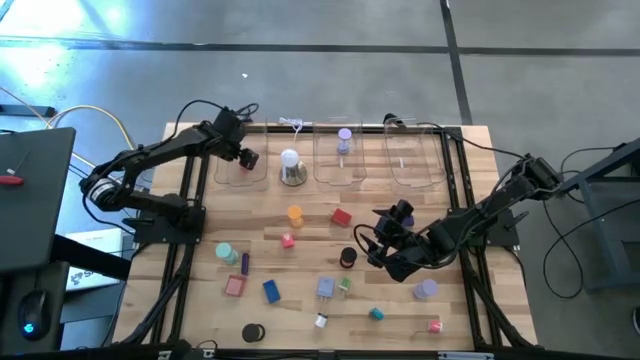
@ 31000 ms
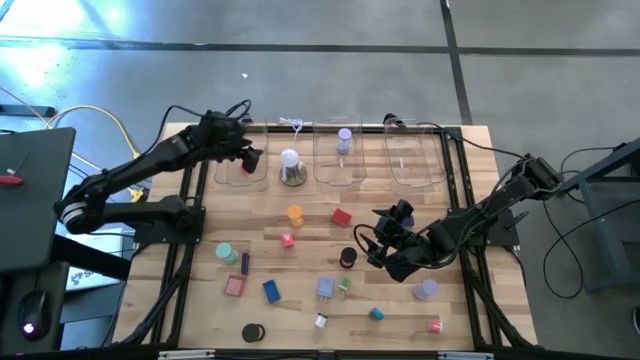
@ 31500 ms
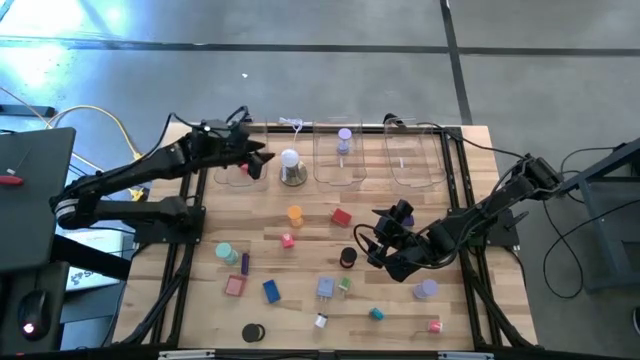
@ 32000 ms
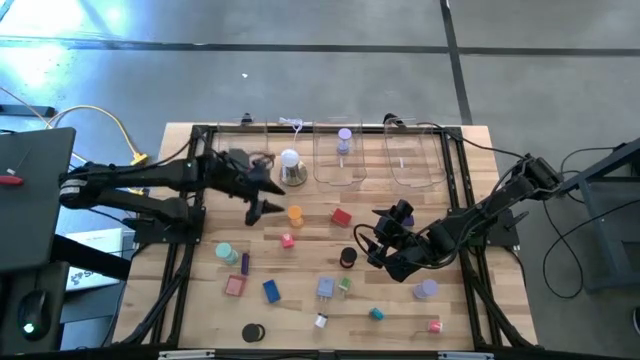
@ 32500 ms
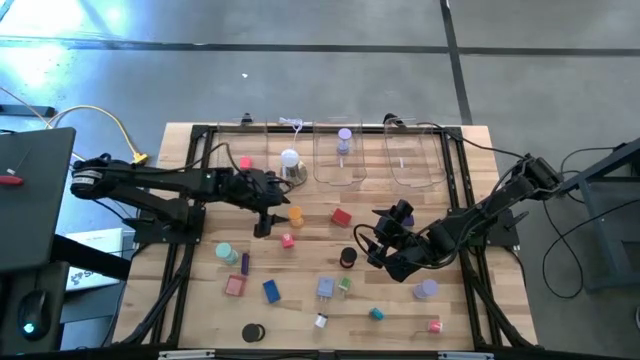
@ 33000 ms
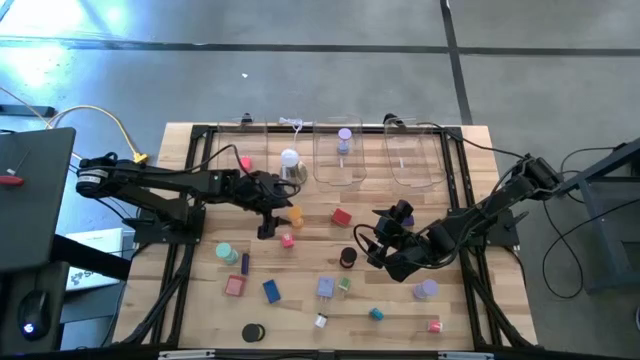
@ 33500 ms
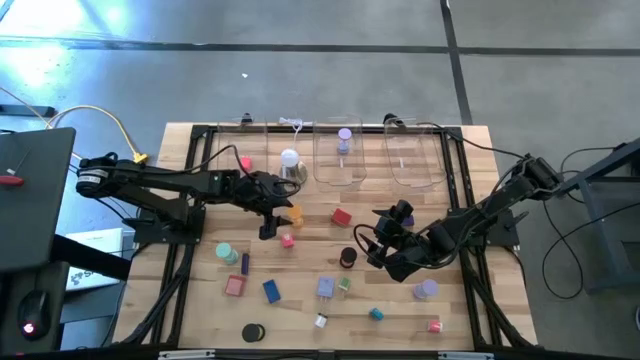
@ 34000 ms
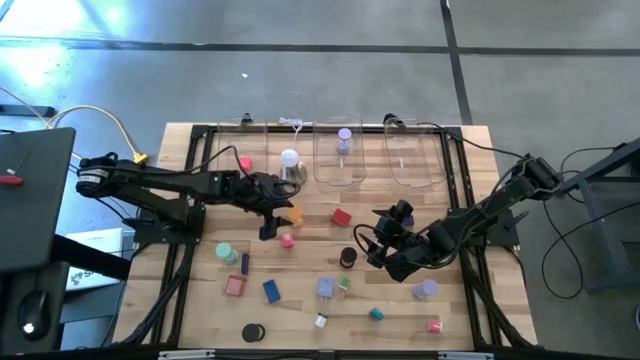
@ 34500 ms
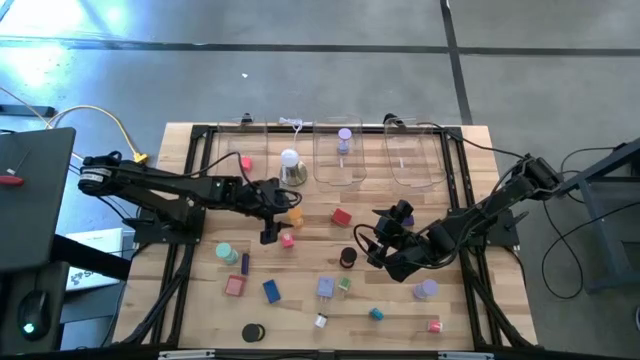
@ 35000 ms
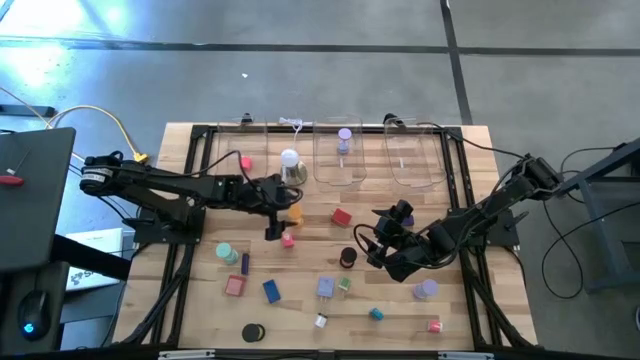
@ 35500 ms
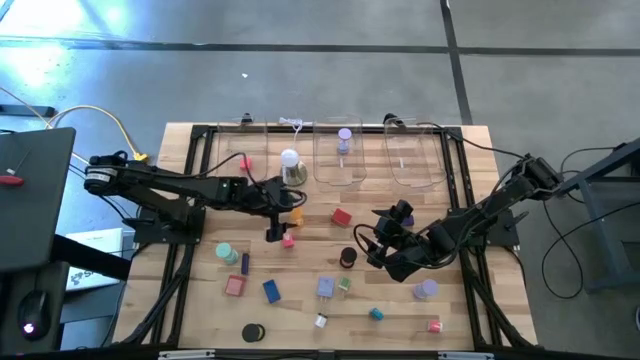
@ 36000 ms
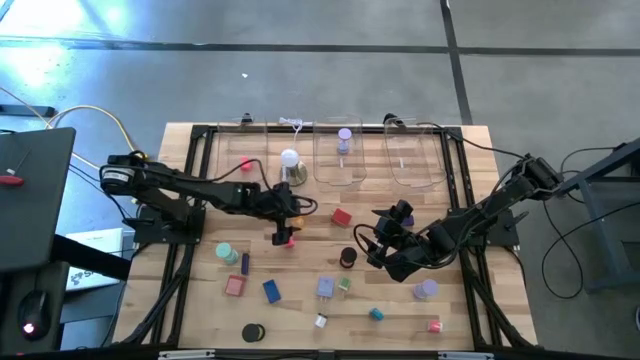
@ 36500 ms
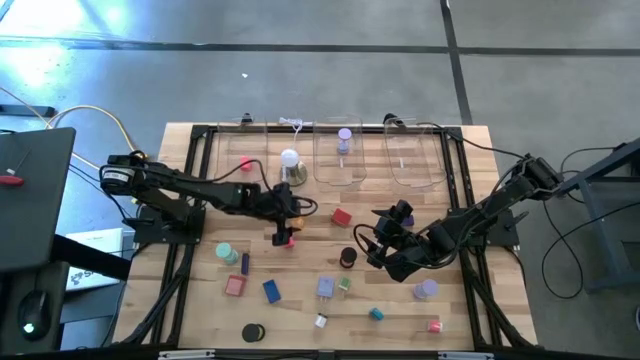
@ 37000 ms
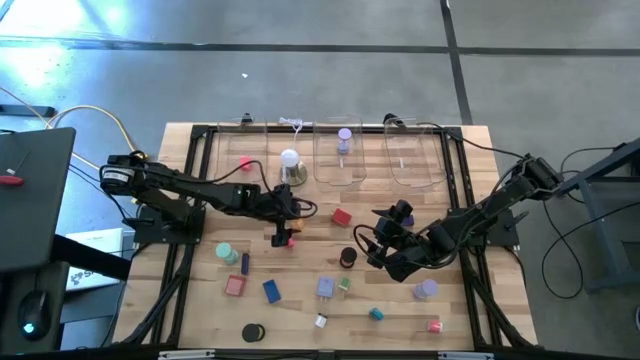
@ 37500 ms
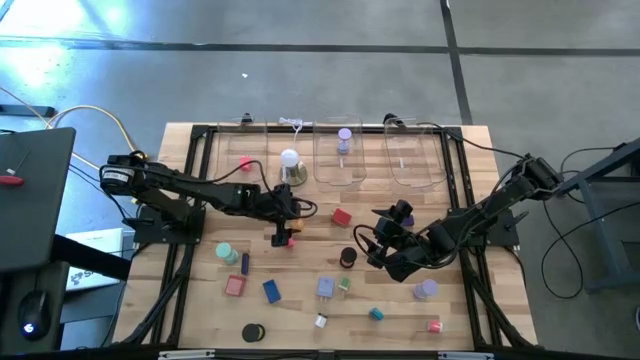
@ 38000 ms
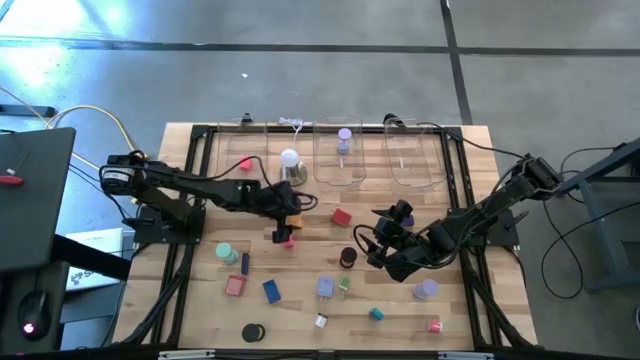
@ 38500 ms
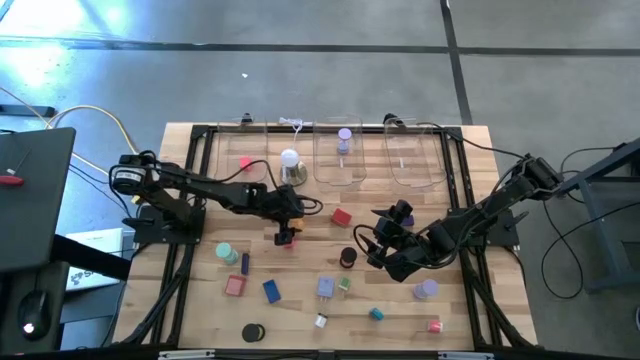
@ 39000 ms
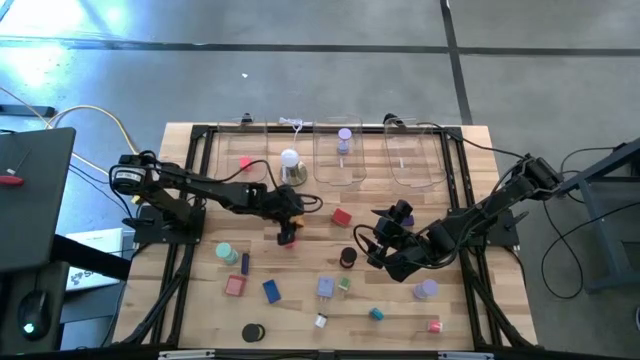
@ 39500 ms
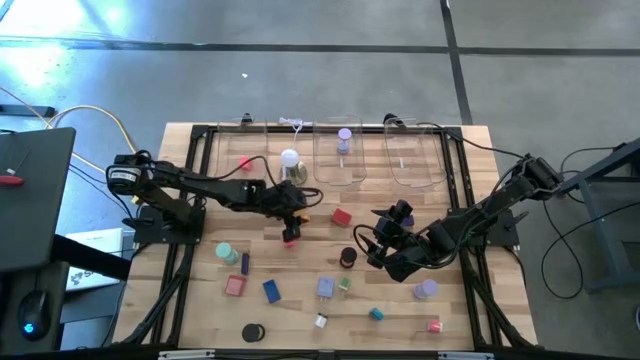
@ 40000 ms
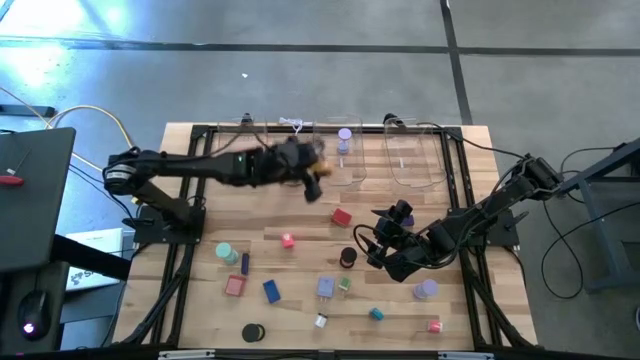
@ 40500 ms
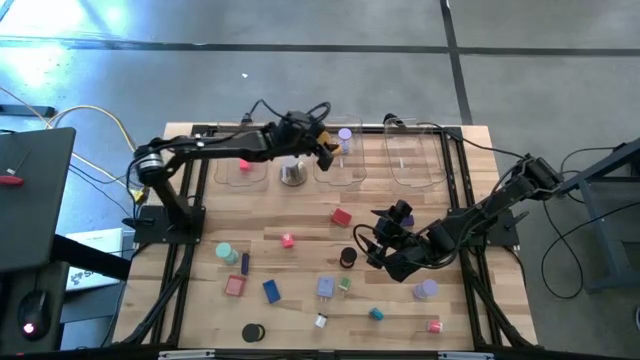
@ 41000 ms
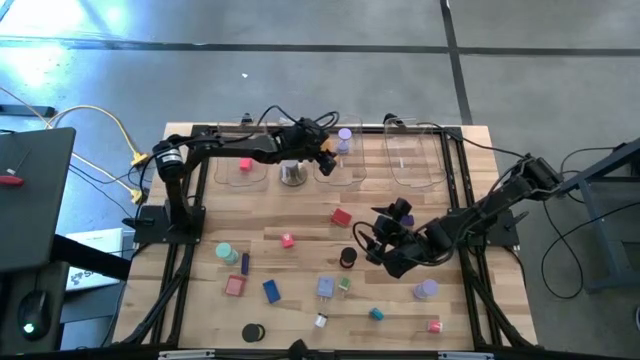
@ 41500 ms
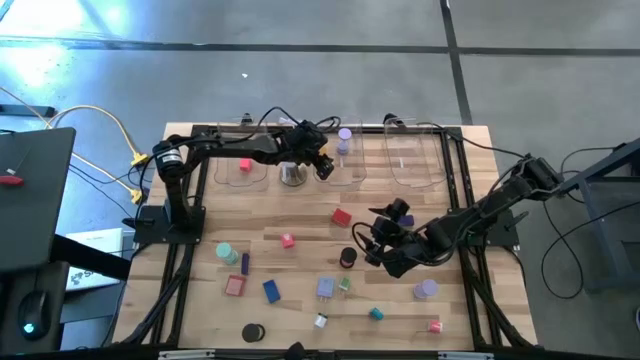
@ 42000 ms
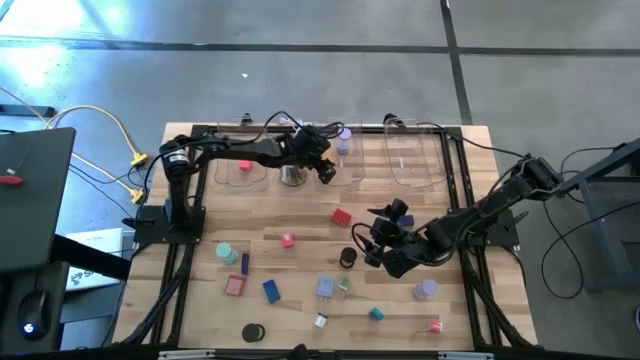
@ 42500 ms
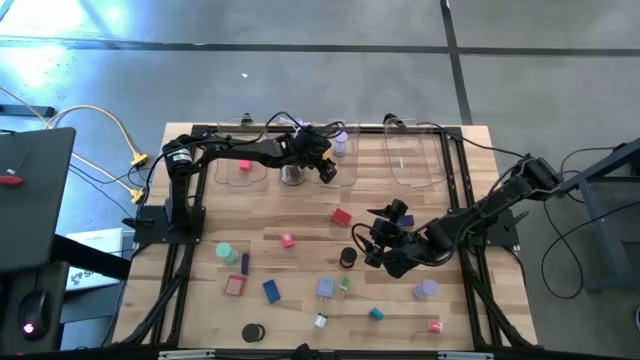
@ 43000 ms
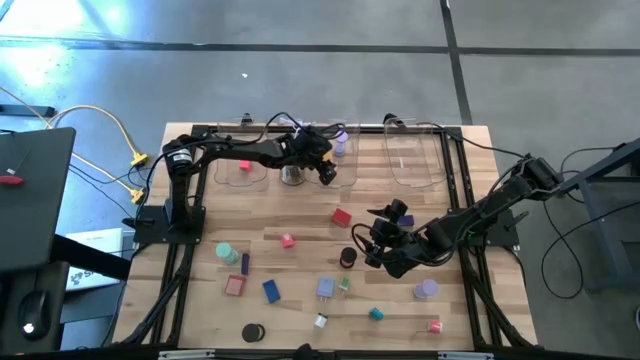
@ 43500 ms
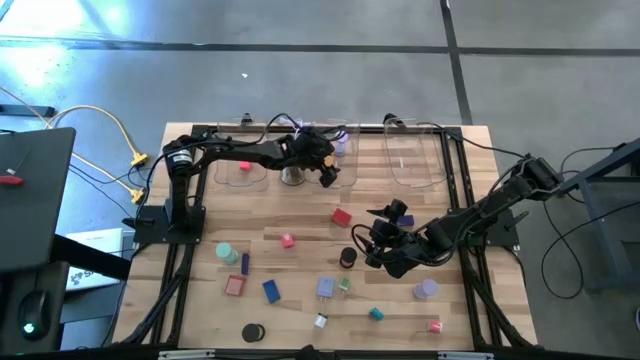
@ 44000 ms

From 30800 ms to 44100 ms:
Task: Pick & Place Office items
Put the yellow hourglass into the middle transparent bin

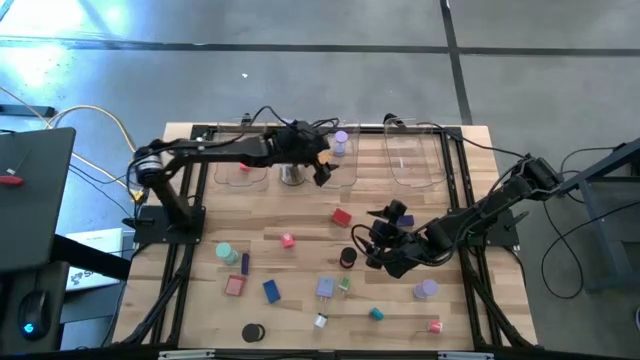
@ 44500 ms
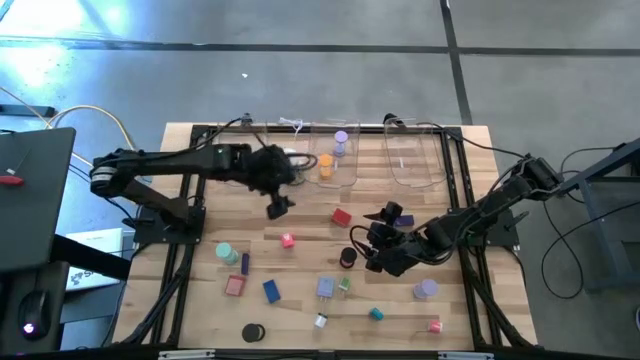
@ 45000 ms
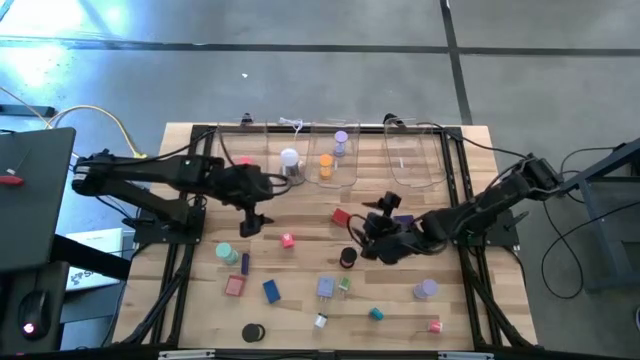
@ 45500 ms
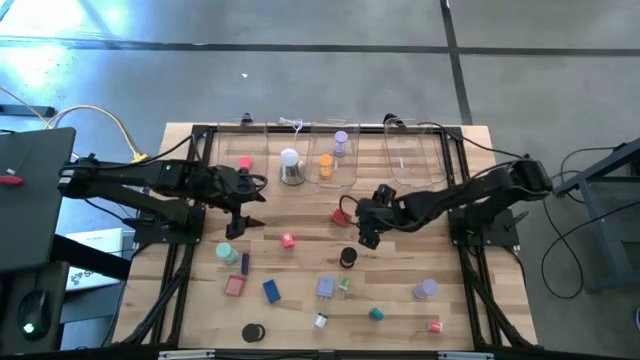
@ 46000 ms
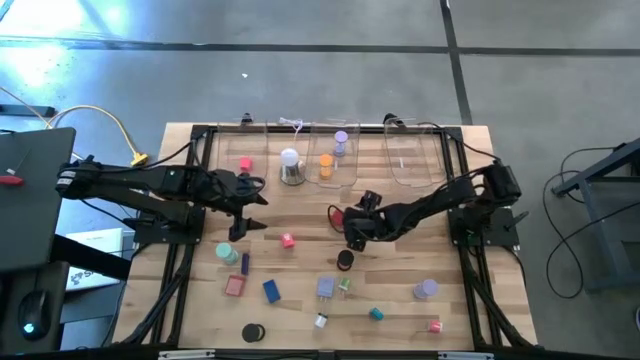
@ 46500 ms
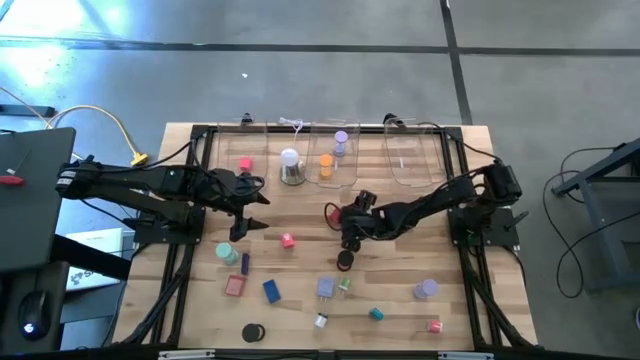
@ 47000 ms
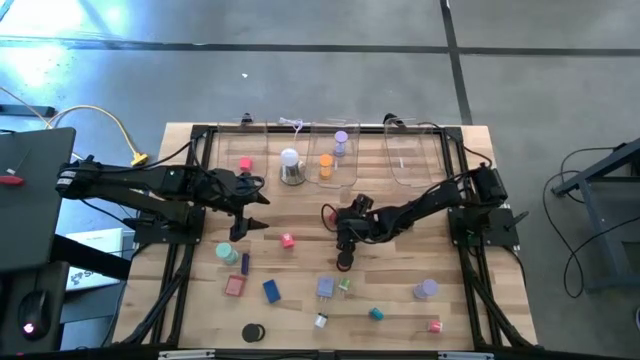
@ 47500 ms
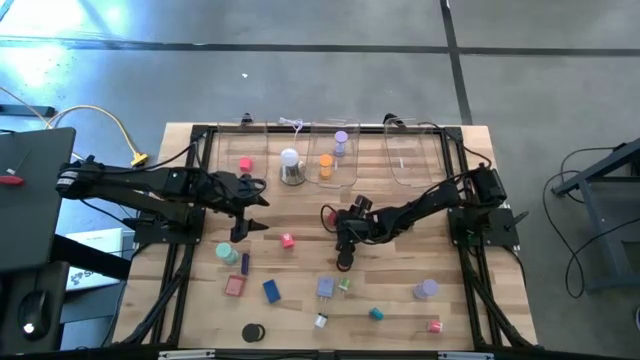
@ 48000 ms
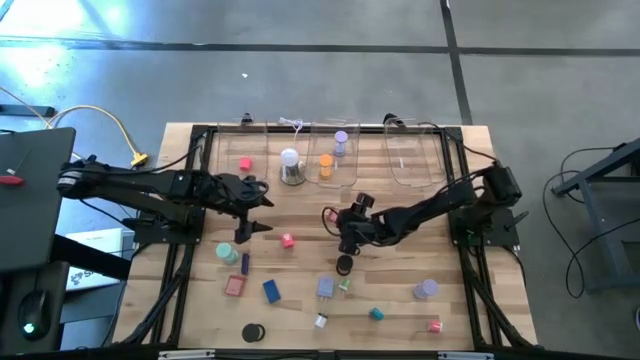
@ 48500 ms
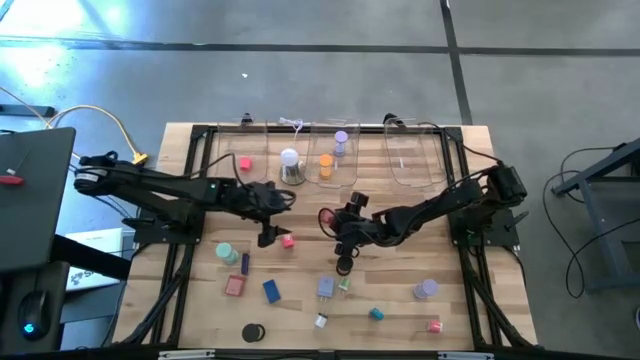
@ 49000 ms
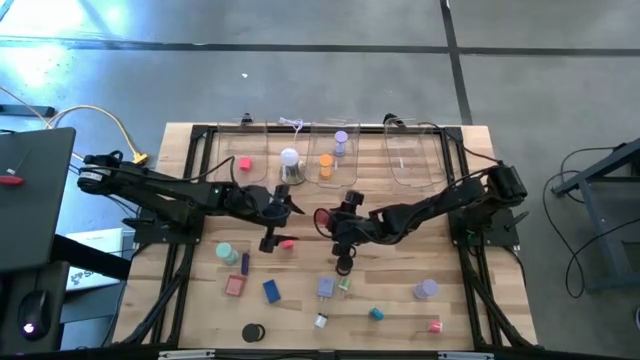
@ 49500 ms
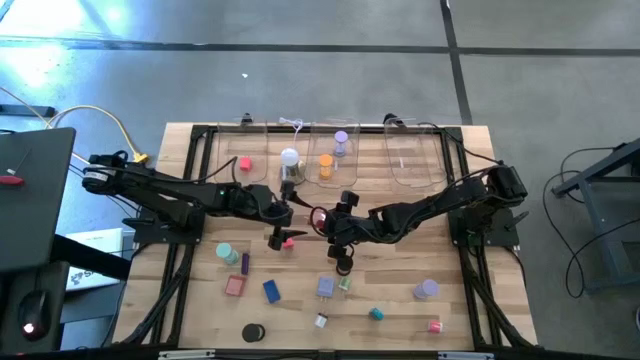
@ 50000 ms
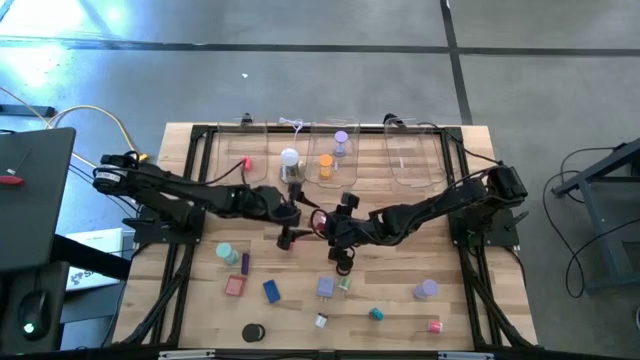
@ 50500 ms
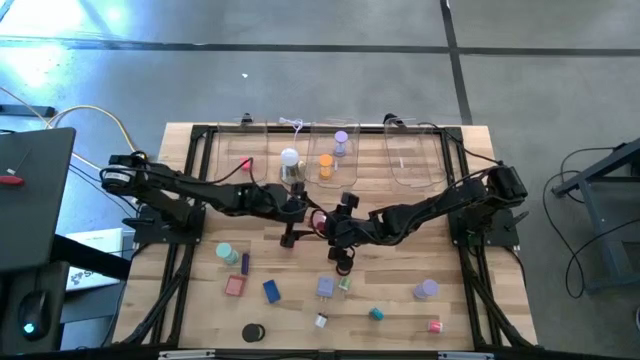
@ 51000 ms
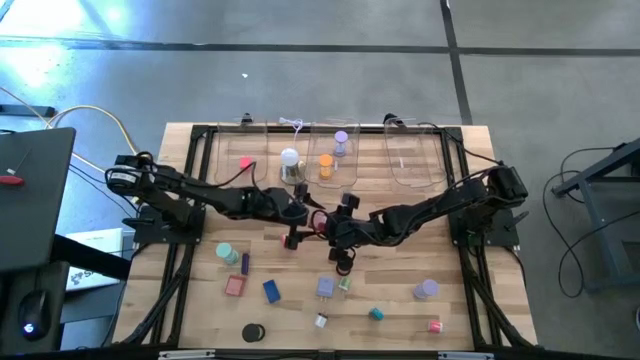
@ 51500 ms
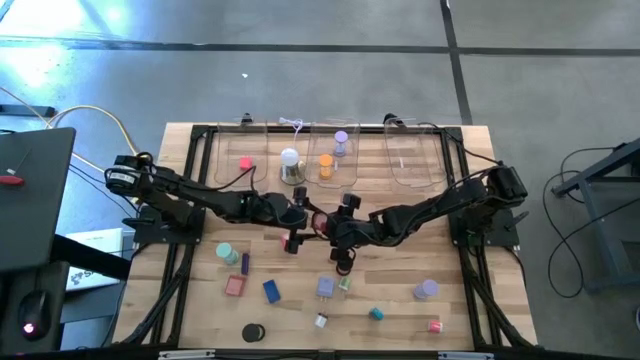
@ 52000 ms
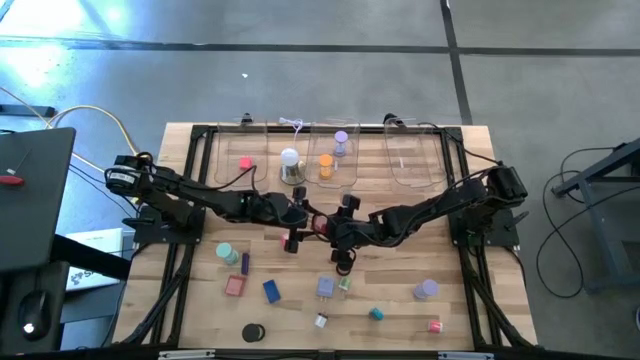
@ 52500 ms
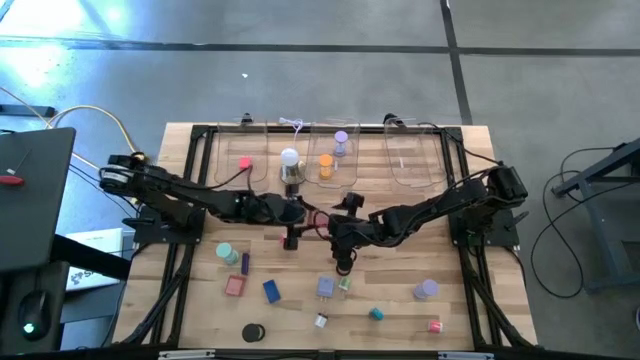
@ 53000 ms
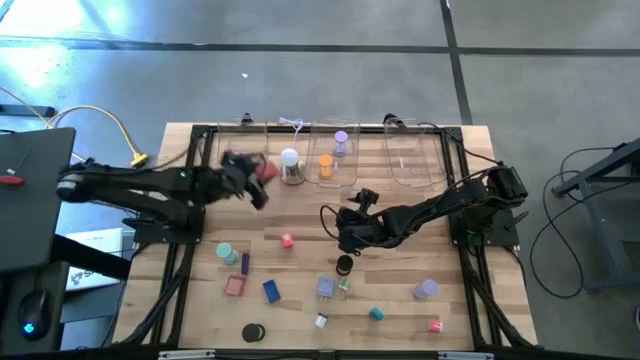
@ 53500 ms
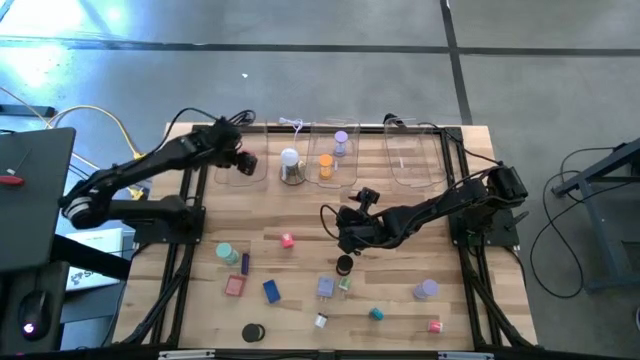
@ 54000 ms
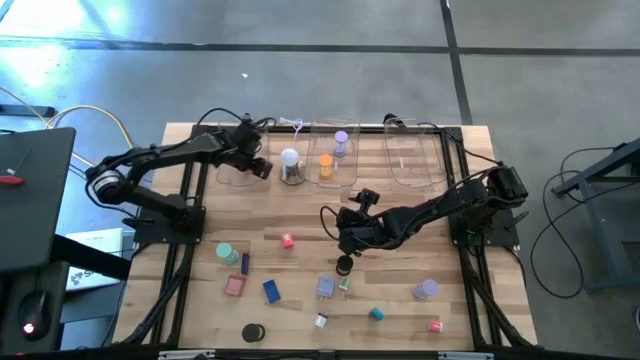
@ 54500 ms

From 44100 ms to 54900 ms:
Put the top red charger adapter into the left transparent bin
